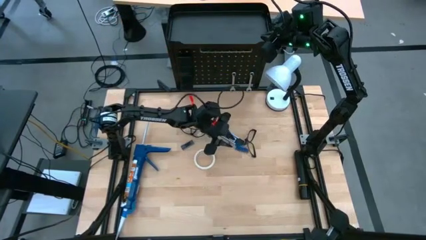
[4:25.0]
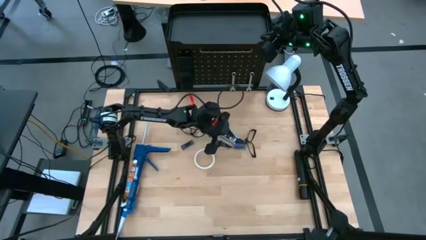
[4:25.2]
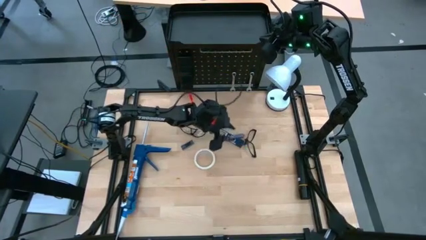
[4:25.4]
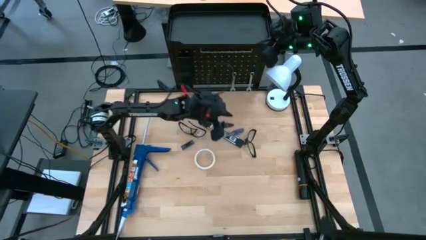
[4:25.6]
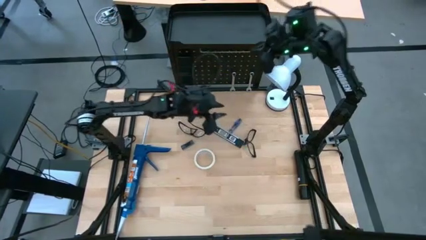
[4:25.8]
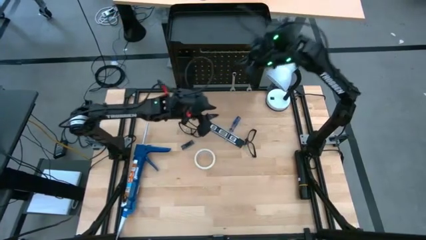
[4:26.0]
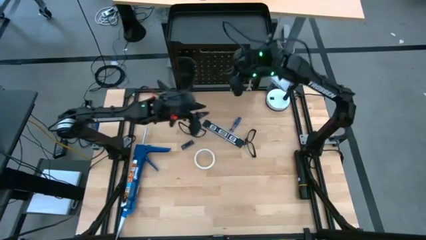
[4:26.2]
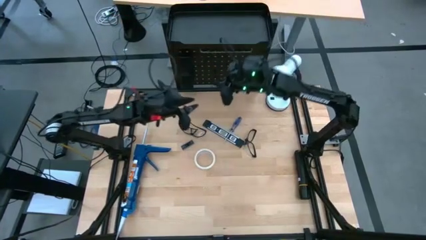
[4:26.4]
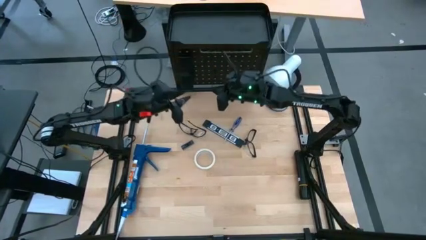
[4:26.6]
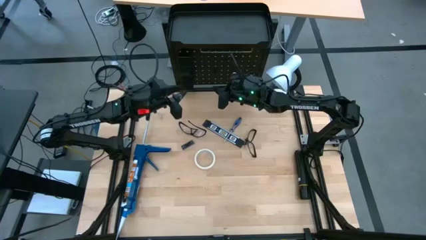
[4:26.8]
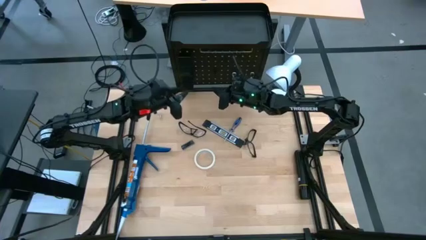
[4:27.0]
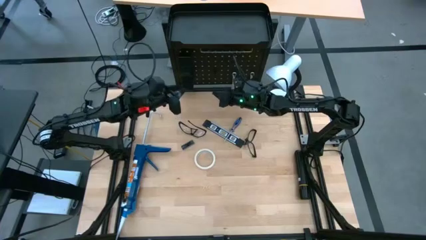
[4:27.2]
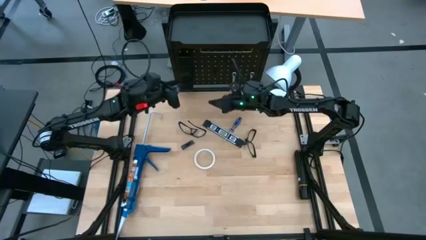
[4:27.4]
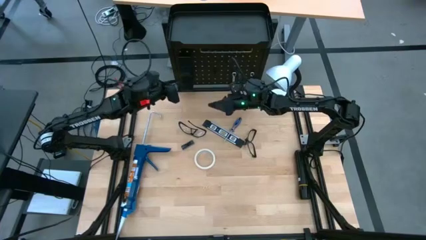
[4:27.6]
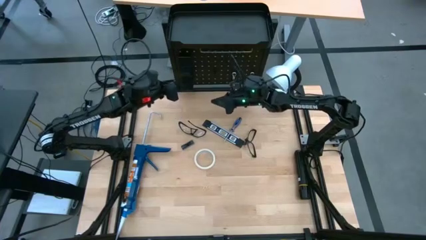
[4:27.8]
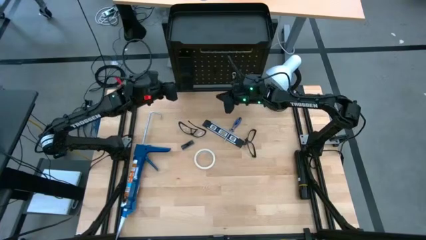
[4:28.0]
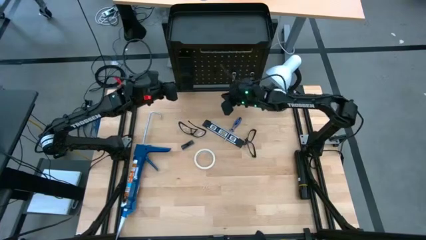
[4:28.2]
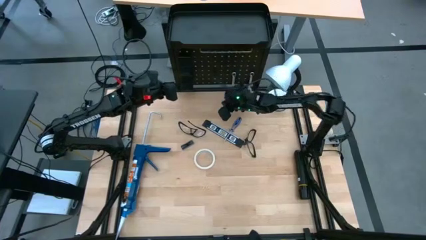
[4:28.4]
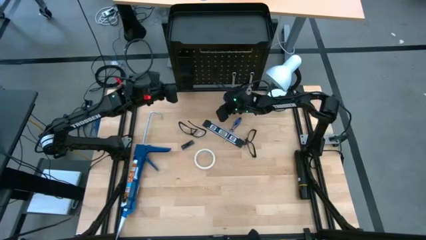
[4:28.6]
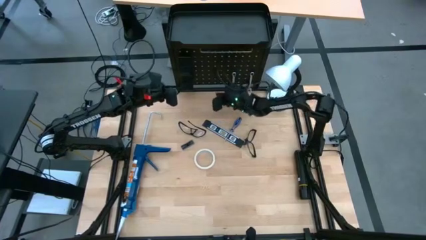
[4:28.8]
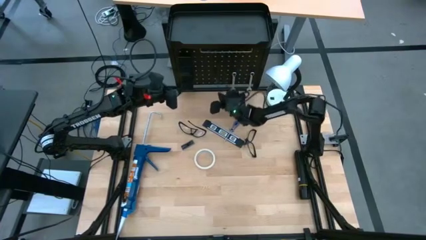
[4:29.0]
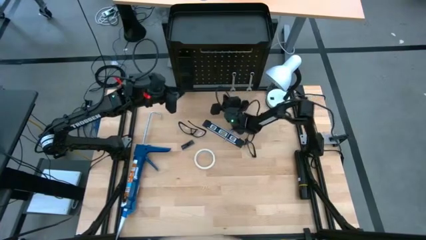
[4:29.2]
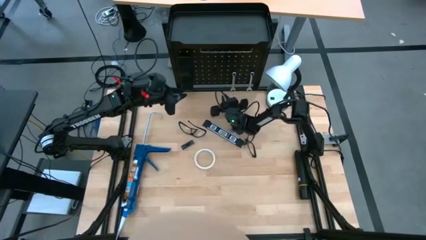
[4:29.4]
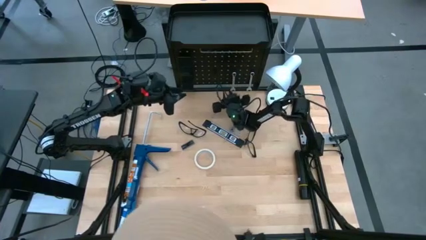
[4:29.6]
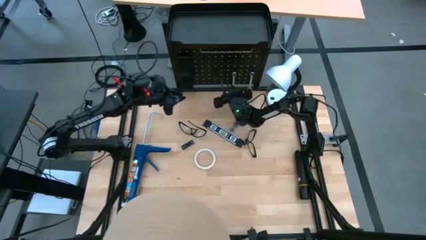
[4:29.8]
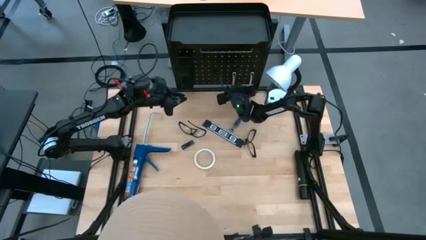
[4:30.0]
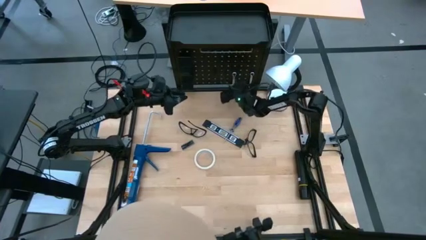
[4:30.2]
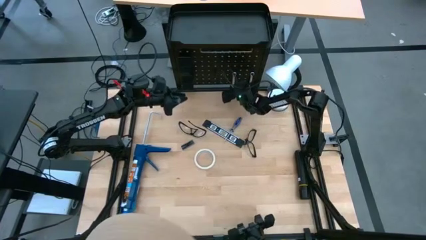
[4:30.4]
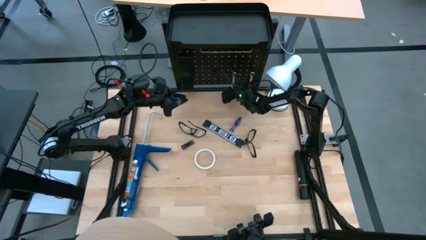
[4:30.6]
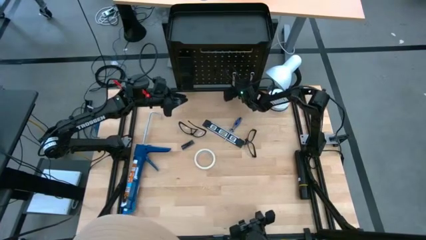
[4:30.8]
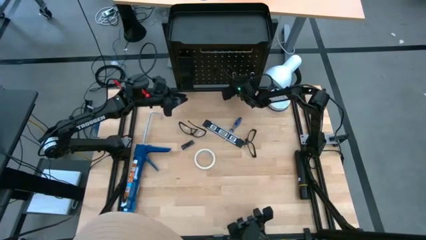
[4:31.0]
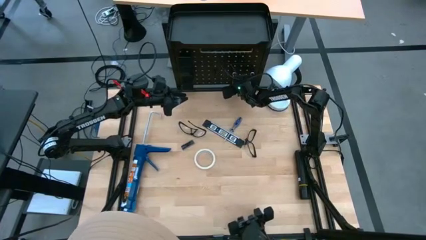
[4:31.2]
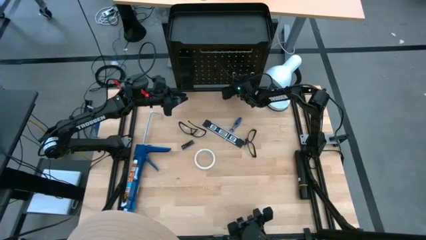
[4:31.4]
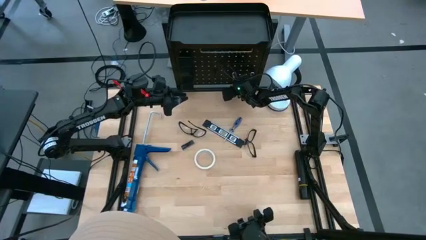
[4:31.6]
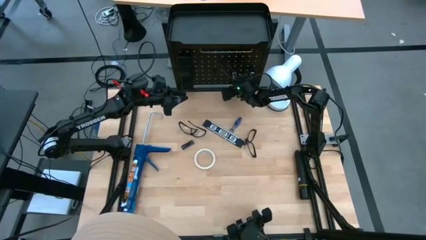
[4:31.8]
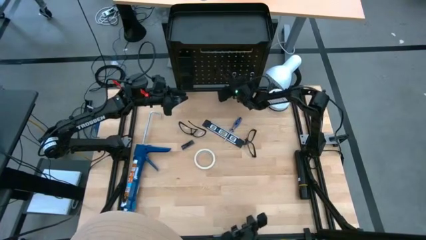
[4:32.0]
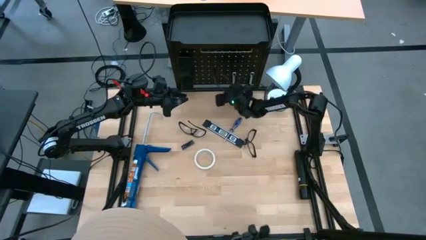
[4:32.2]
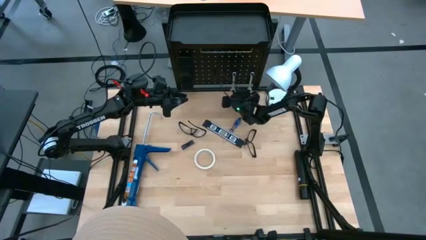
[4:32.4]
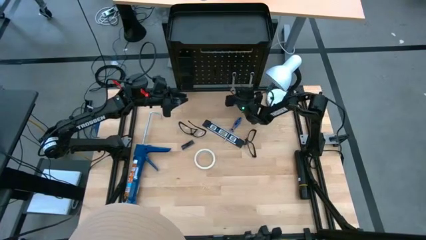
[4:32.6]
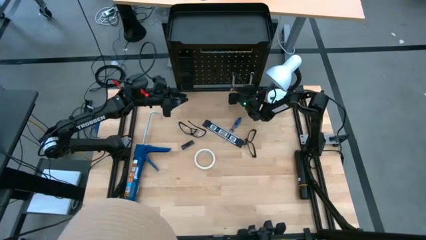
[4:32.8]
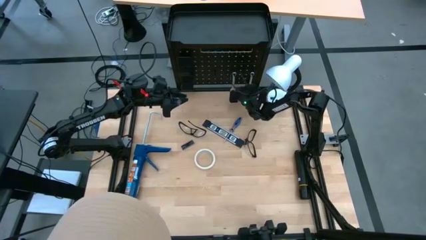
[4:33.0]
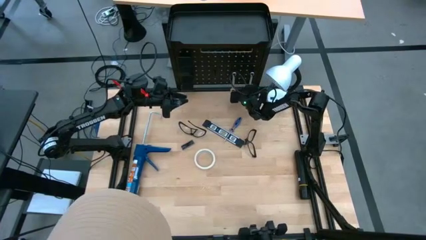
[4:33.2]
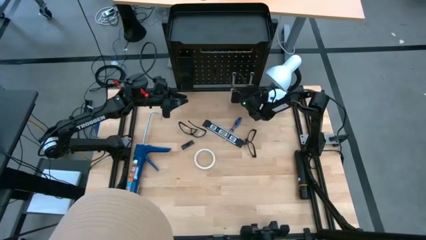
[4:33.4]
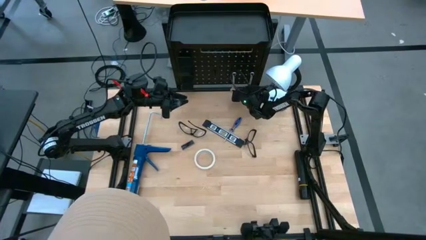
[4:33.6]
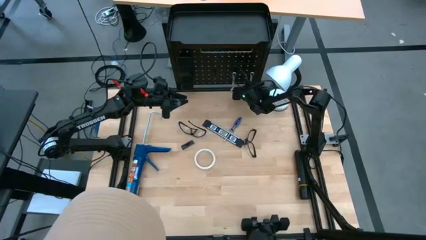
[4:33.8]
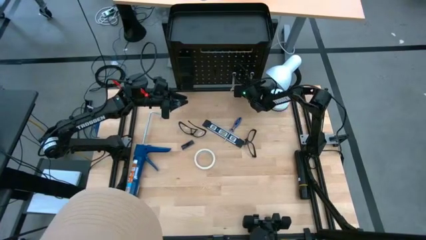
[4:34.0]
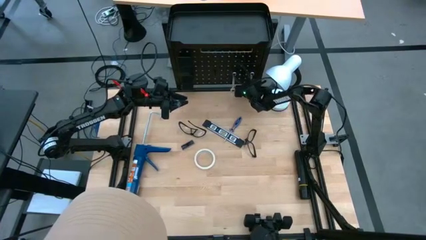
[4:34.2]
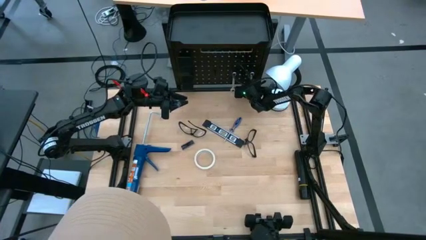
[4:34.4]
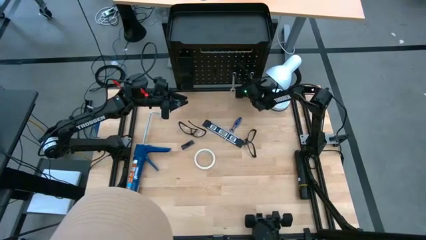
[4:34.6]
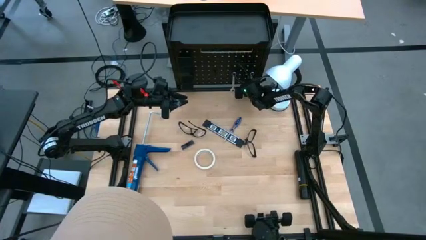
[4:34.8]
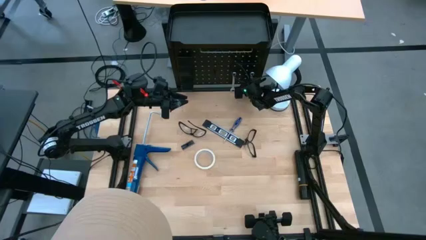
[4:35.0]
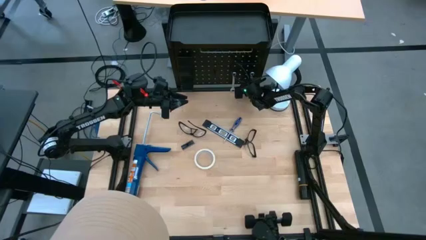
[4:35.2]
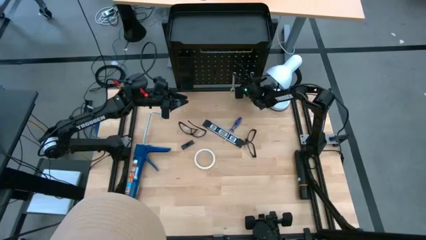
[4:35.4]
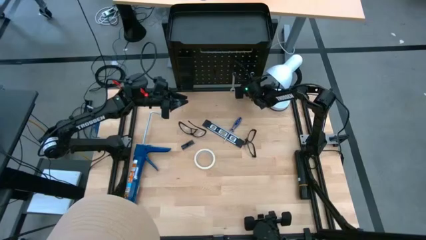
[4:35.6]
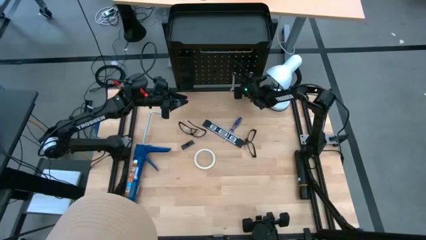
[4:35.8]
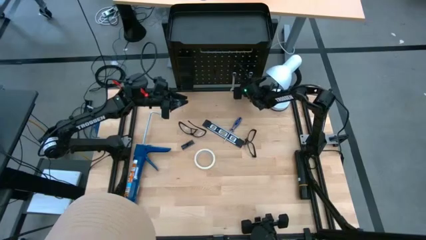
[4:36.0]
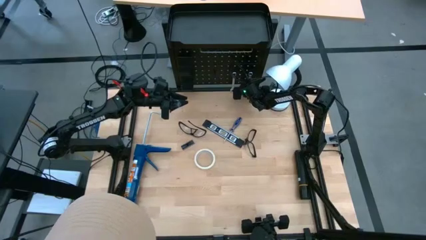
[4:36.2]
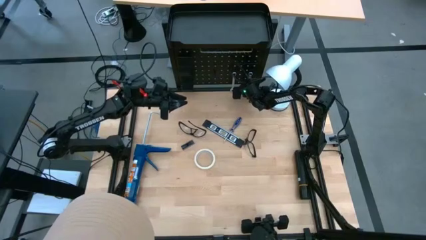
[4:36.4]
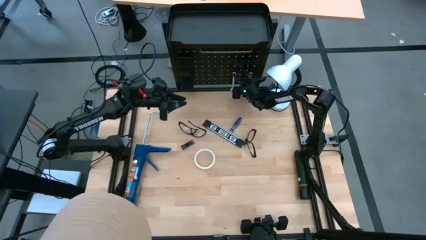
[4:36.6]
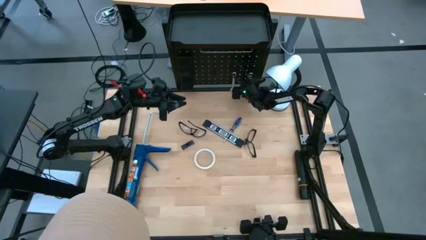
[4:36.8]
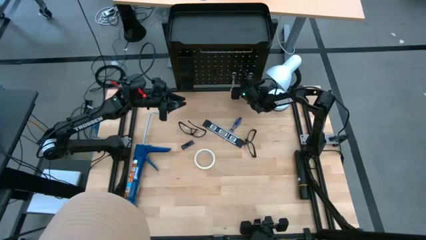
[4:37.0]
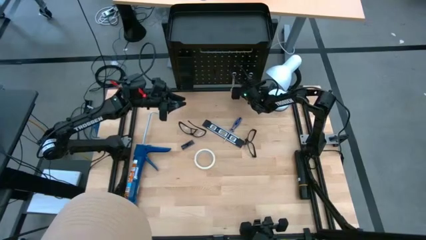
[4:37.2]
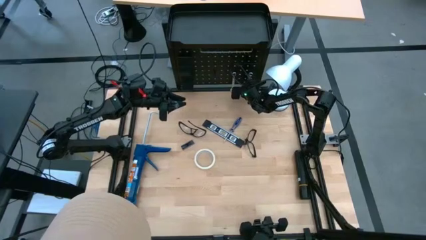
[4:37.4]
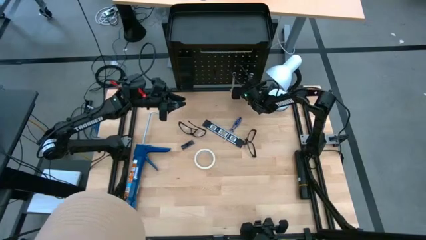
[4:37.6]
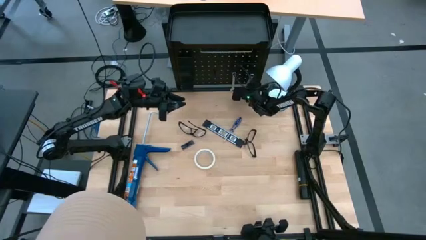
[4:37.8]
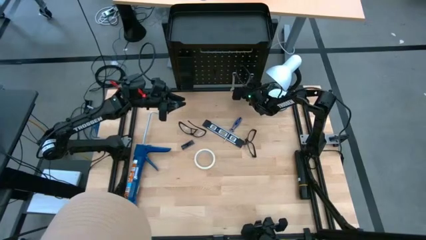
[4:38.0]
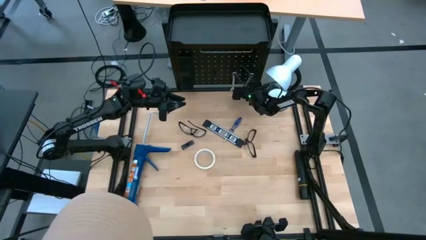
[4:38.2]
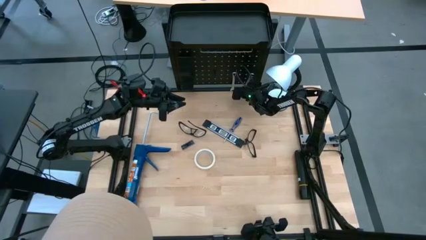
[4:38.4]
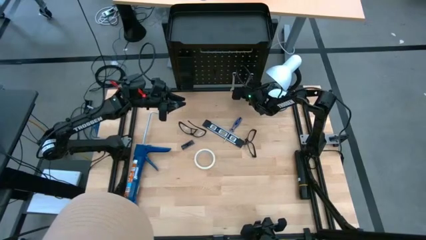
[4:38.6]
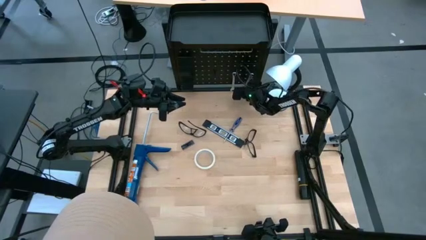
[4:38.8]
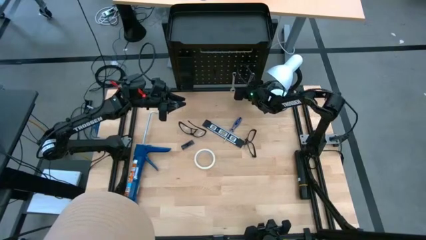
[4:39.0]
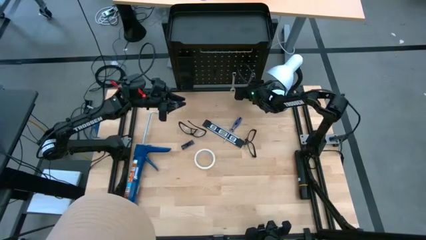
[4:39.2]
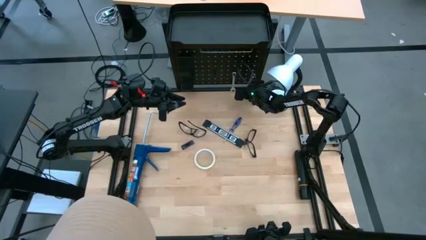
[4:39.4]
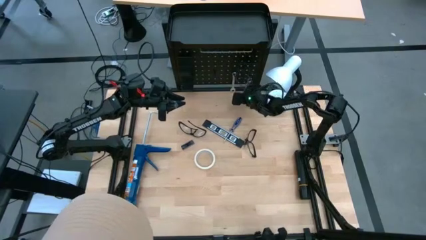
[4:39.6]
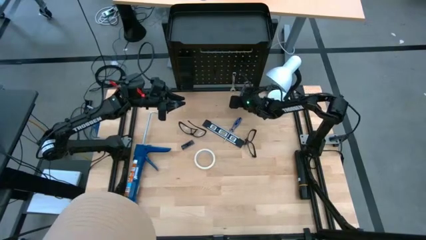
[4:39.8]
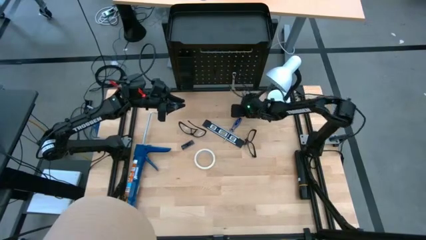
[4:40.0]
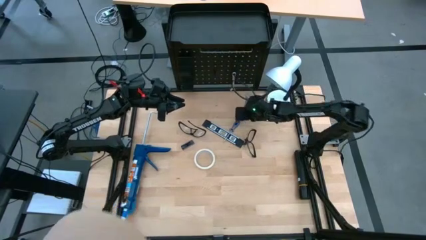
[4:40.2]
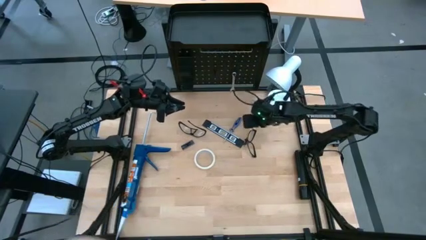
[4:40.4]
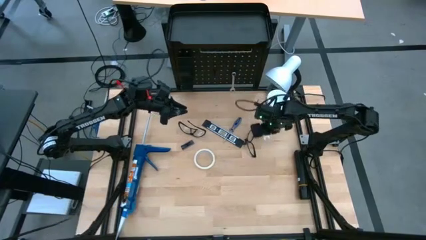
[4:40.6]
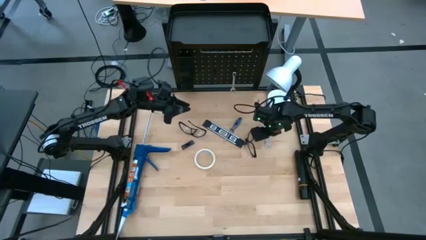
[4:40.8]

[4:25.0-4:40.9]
Task: Hang tools onto peg board
Unhang the right wrench from the peg board
